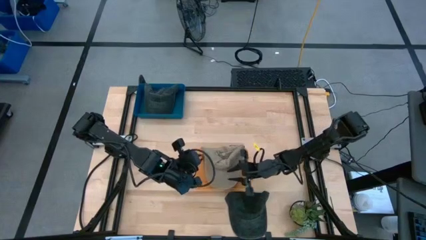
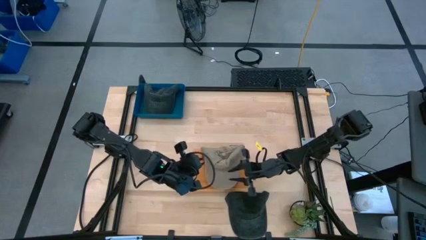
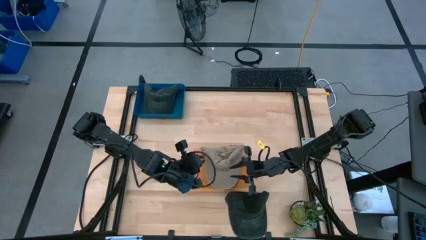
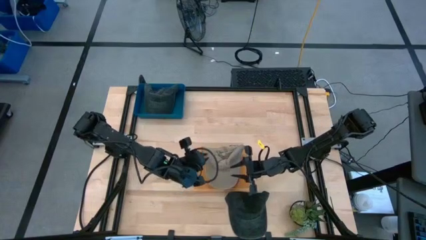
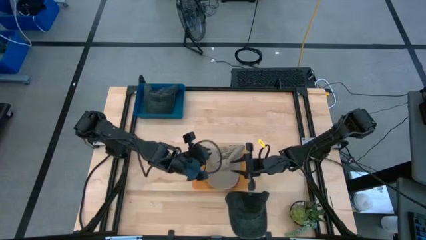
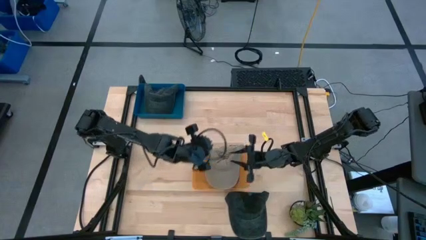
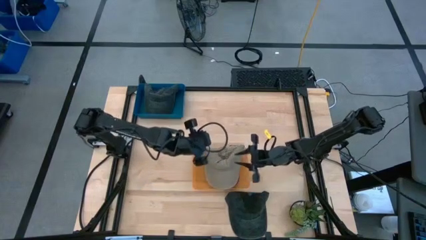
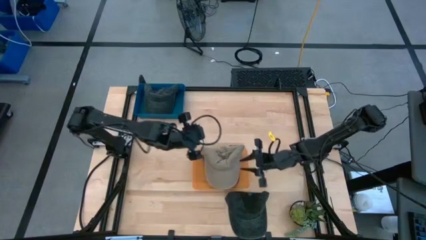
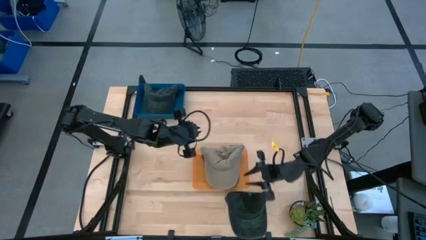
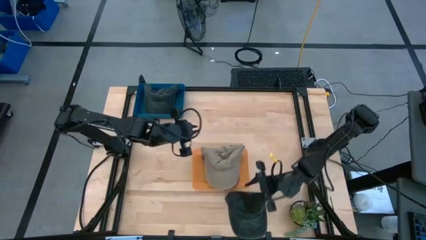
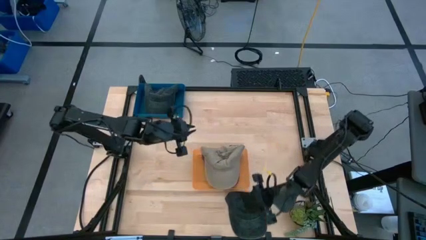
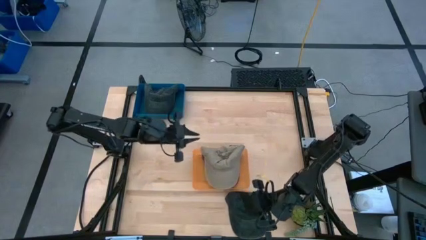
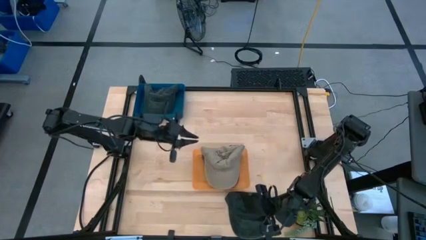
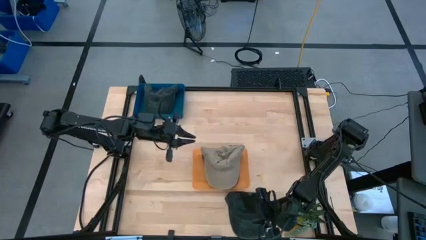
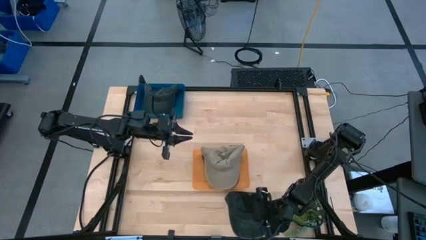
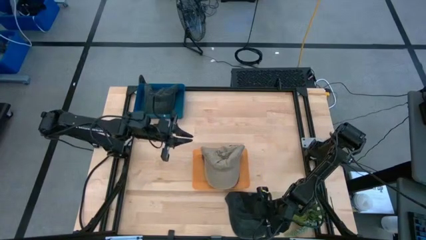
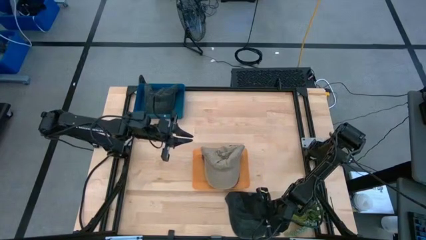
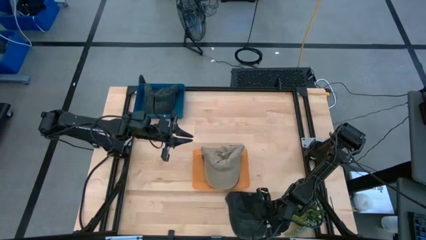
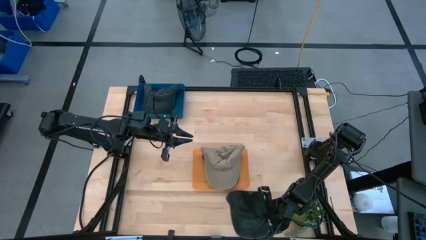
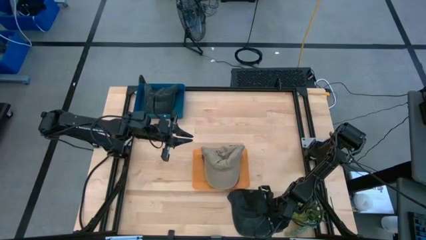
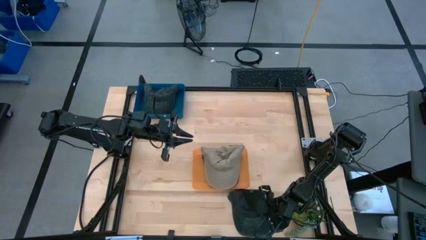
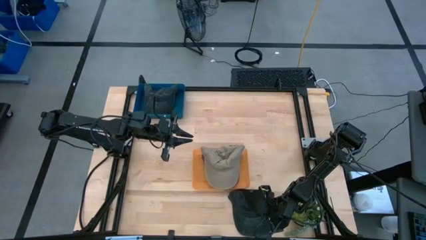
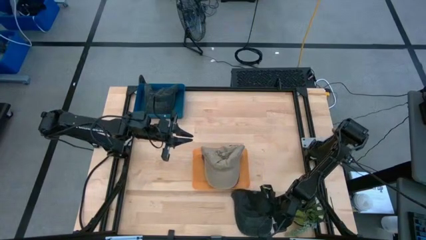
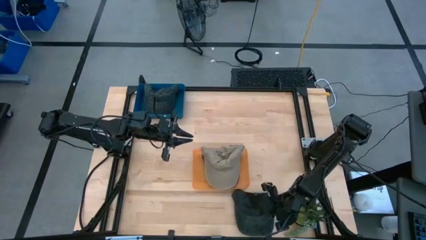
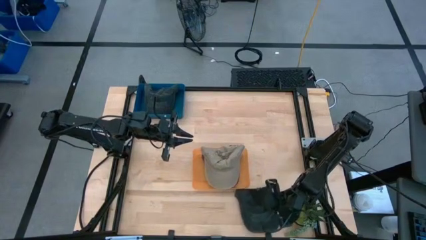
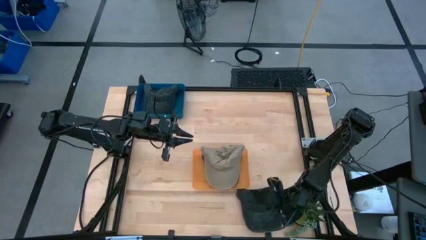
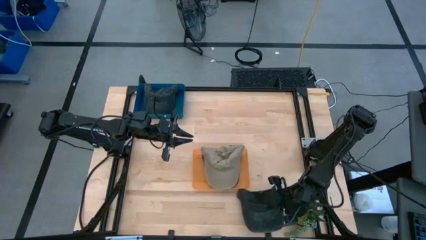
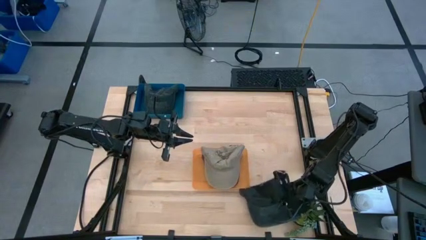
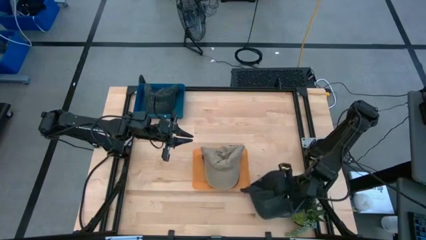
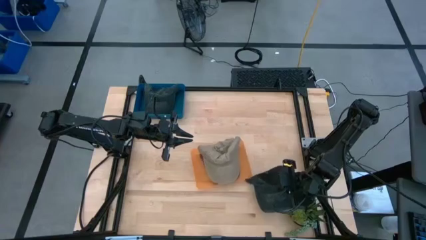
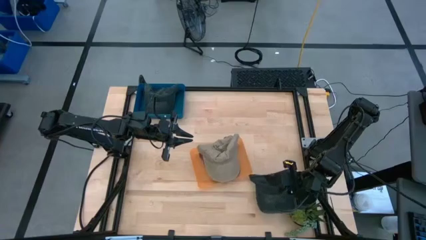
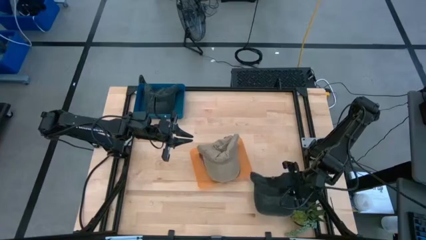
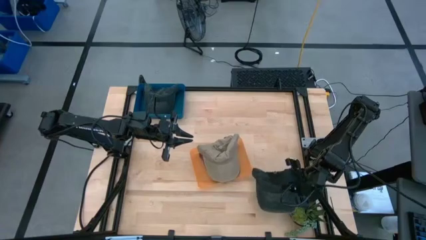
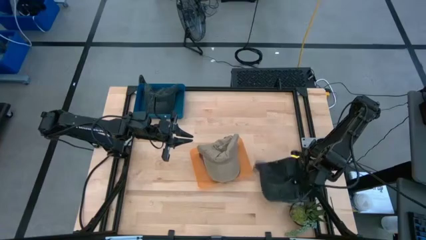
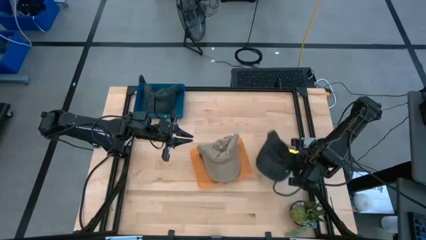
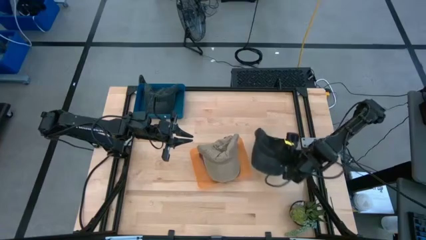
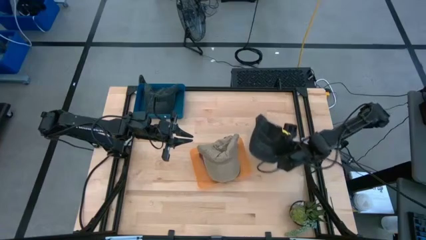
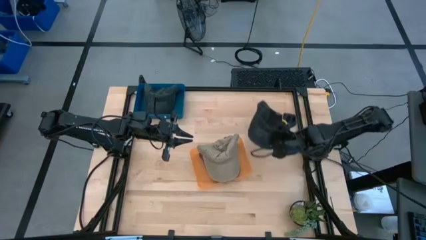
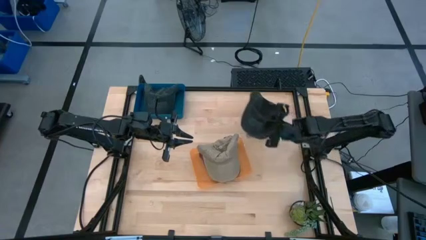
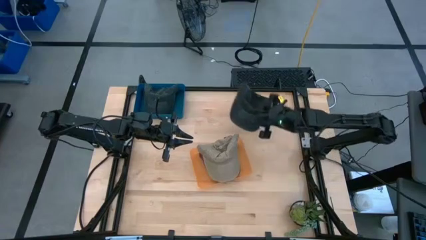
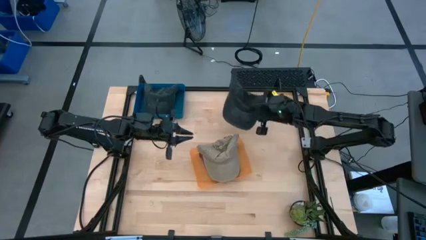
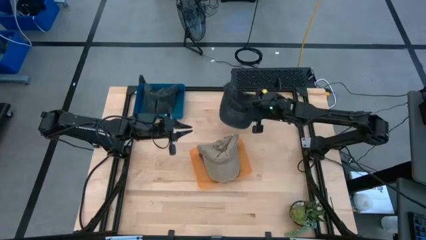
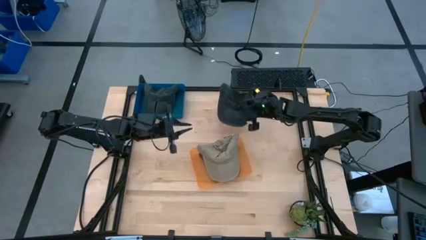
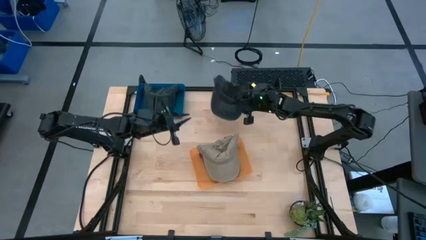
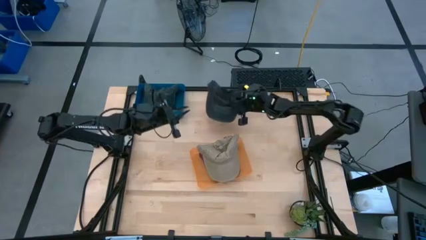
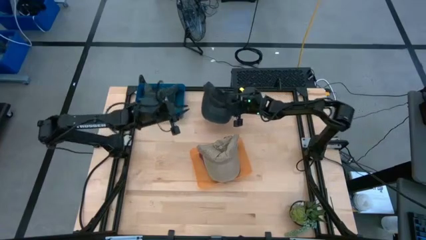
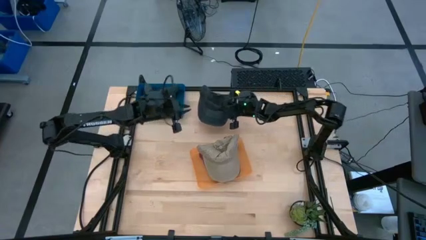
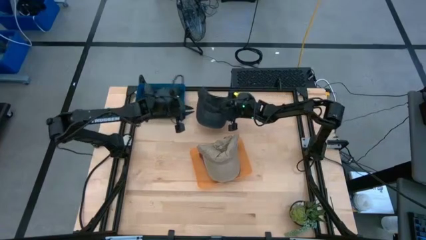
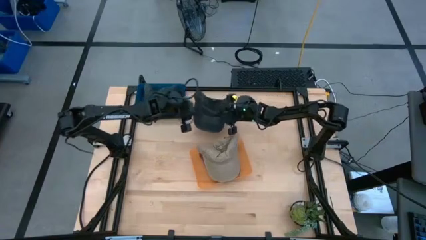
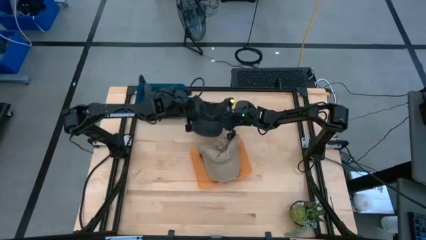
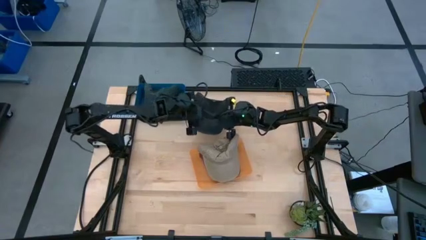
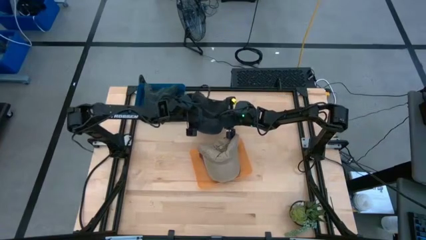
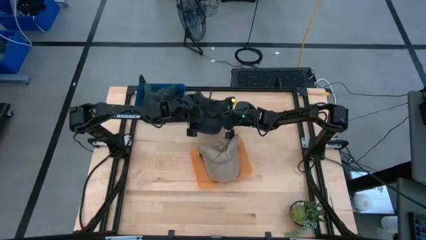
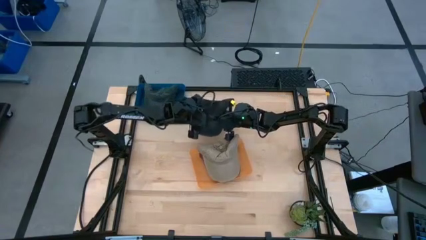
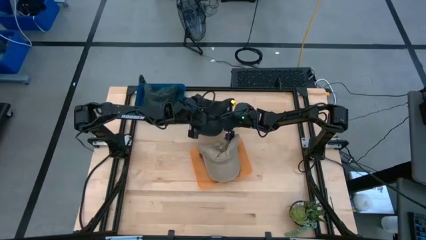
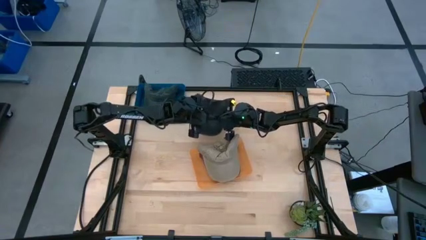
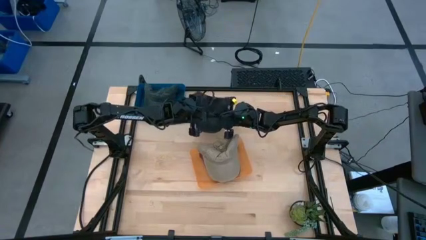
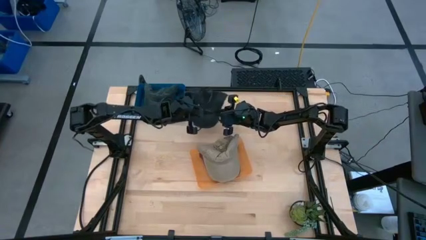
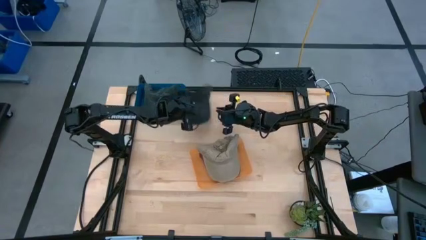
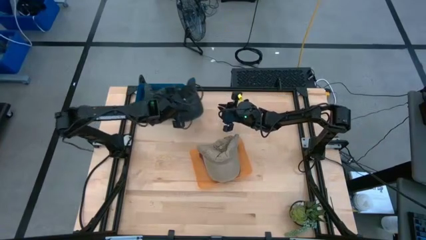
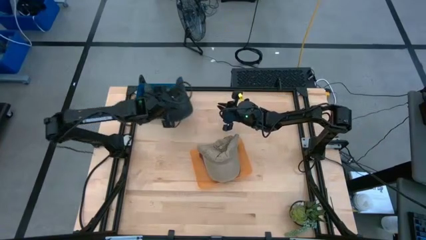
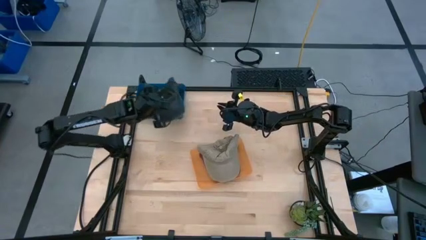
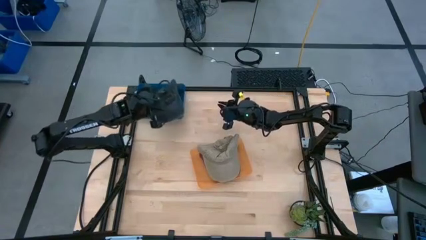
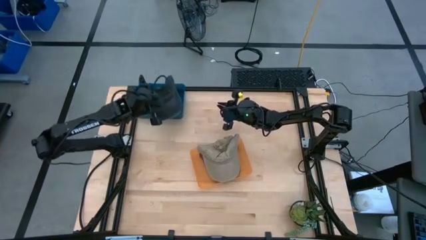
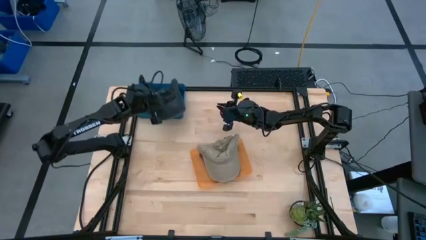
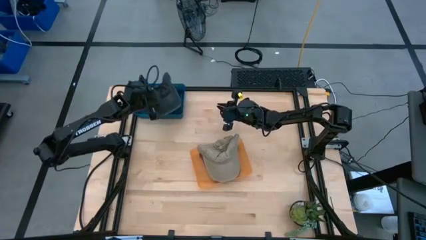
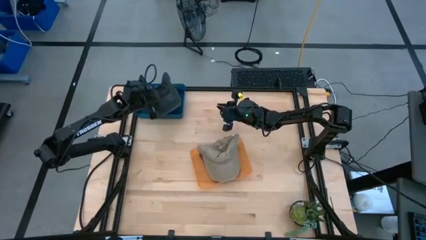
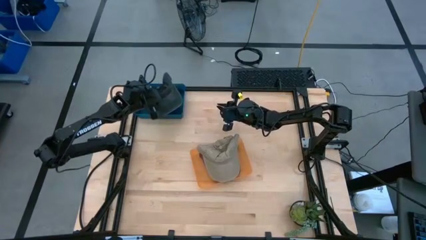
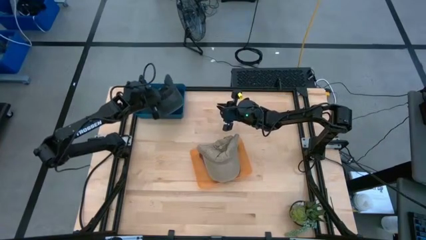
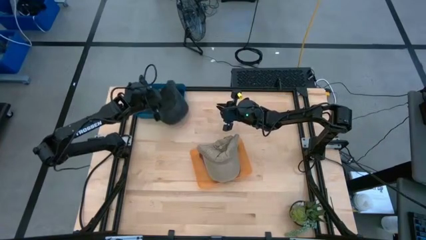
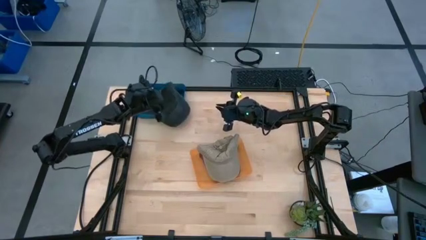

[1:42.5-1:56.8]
Task: Pick & Place hat
Put the black cap into the blue bin
